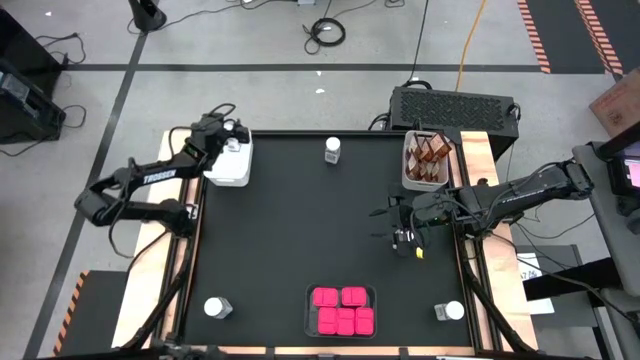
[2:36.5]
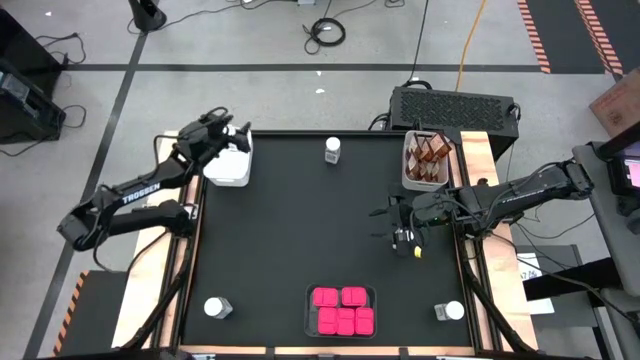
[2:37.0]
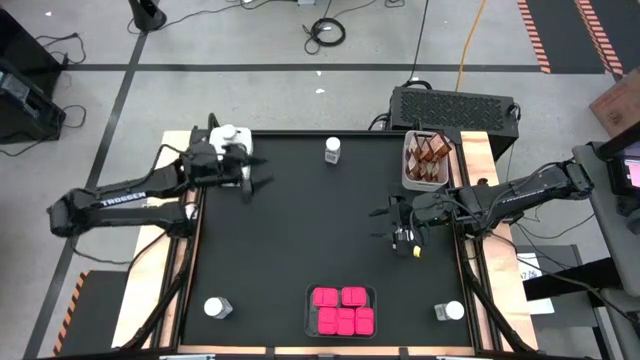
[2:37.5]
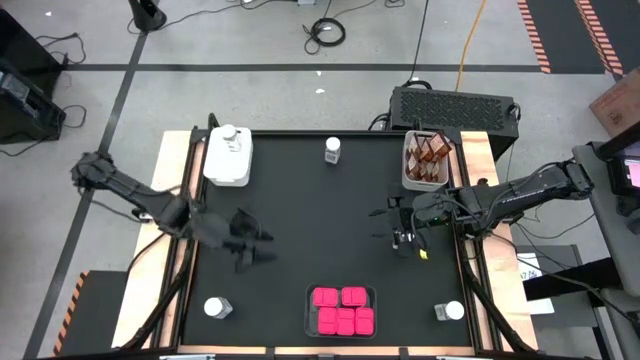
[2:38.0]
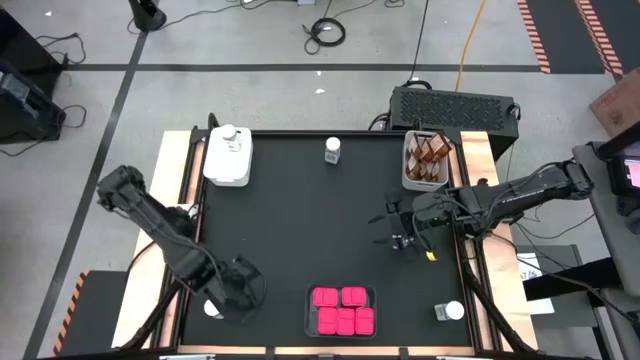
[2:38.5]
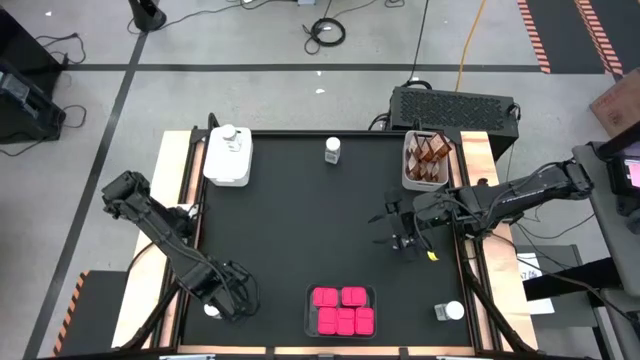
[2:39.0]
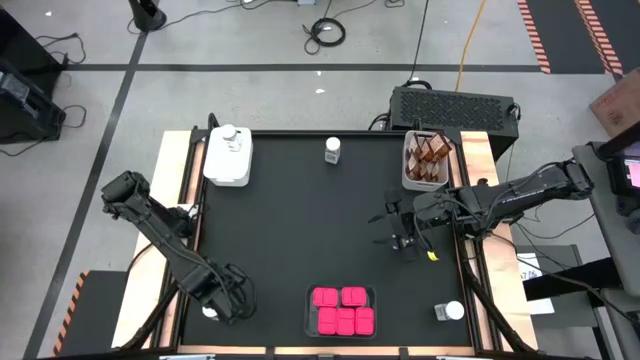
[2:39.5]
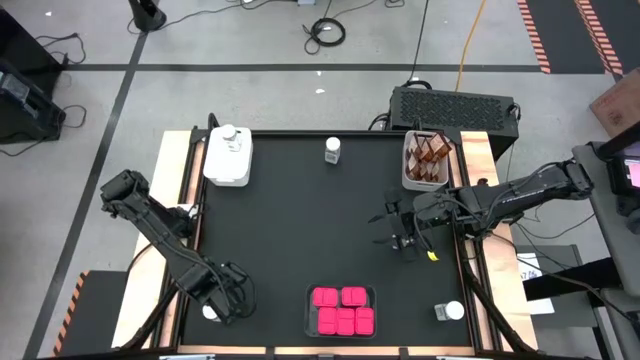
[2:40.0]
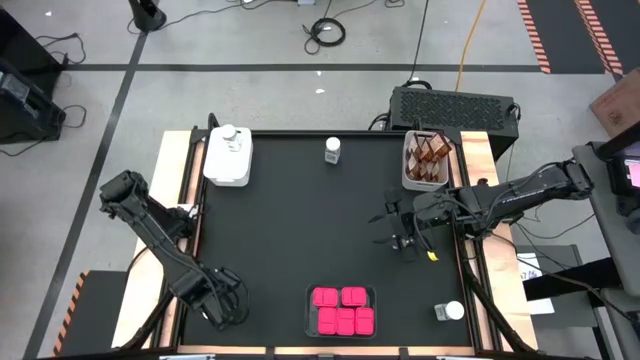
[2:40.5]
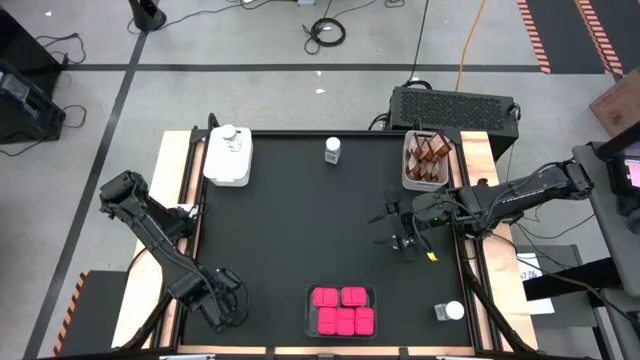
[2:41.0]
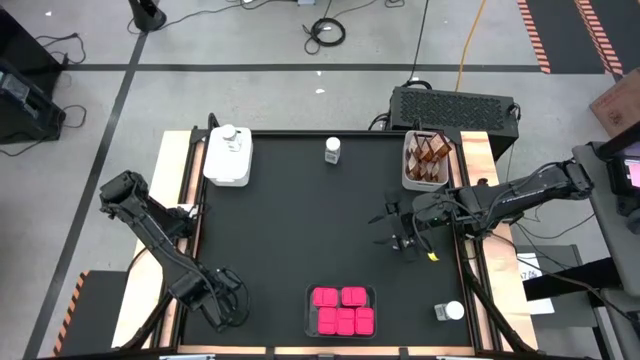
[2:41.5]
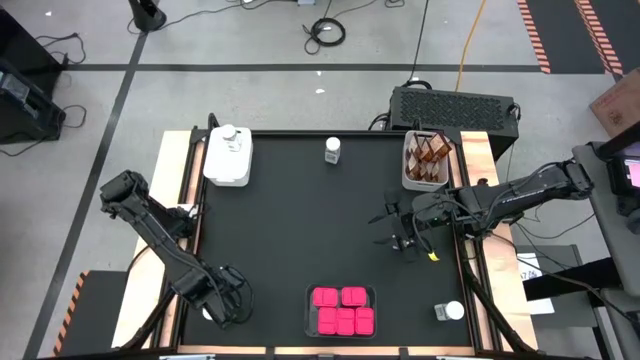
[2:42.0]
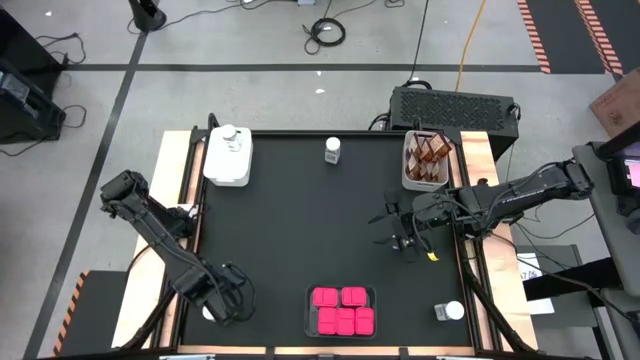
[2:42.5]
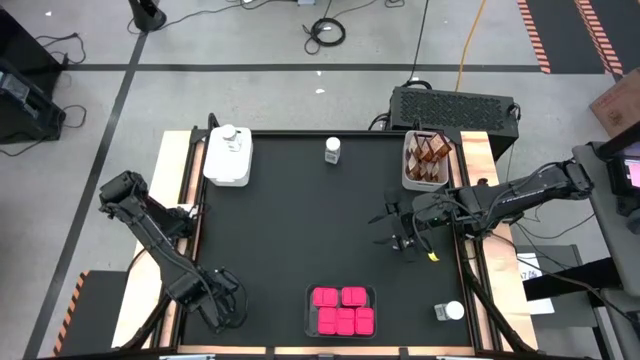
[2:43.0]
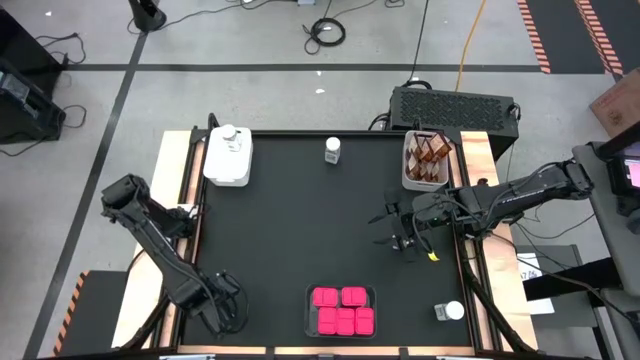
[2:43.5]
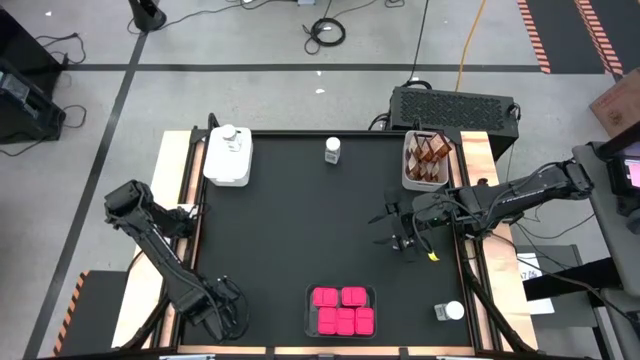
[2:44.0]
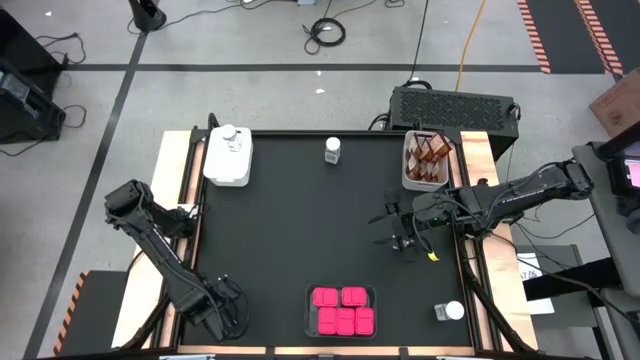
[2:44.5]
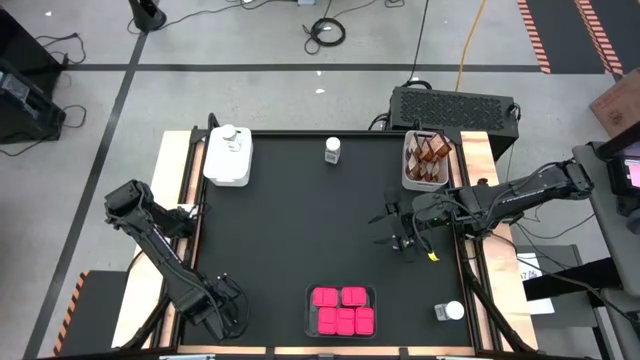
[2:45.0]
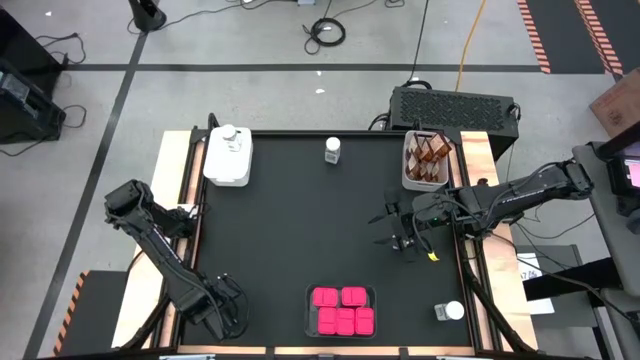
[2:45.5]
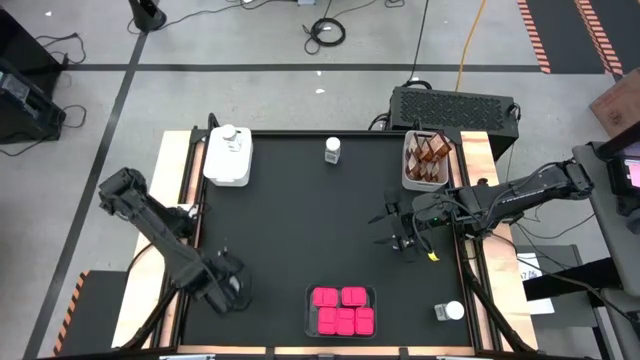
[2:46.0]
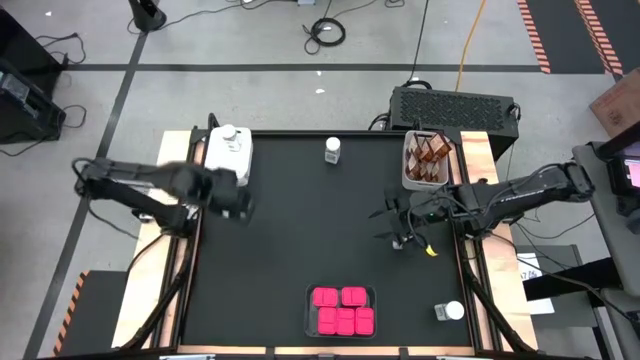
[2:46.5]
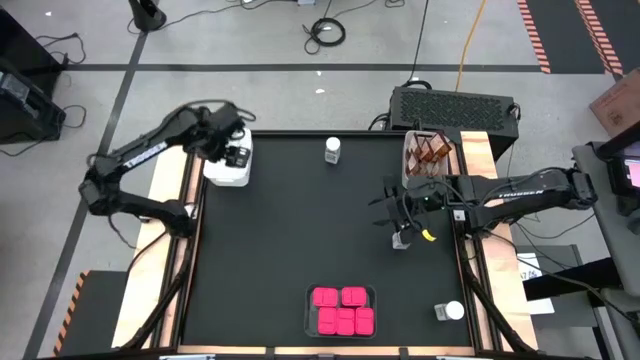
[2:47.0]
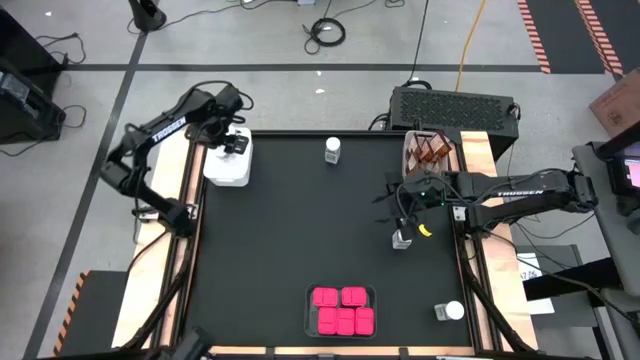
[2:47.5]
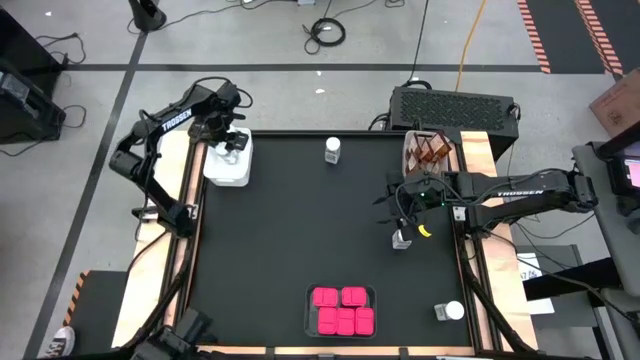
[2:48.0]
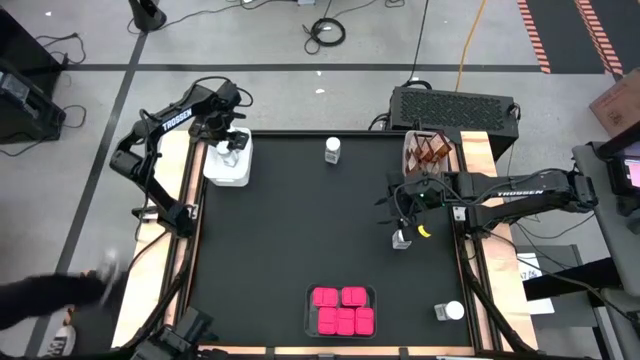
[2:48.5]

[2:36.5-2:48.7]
Task: Sort spices by type
Put the white seasoning bottle into the left white bin

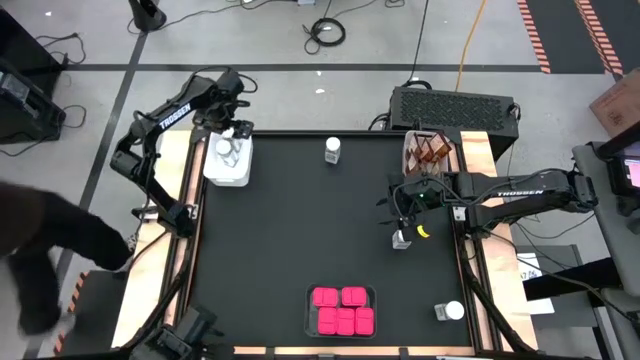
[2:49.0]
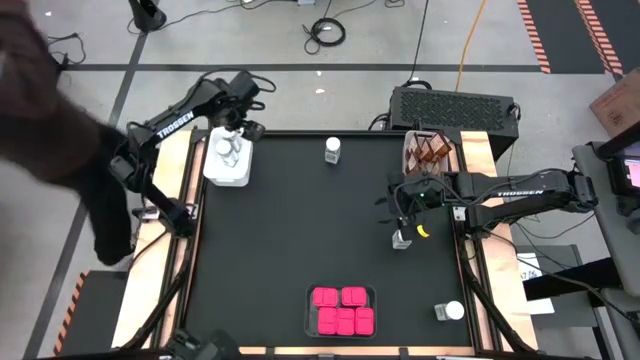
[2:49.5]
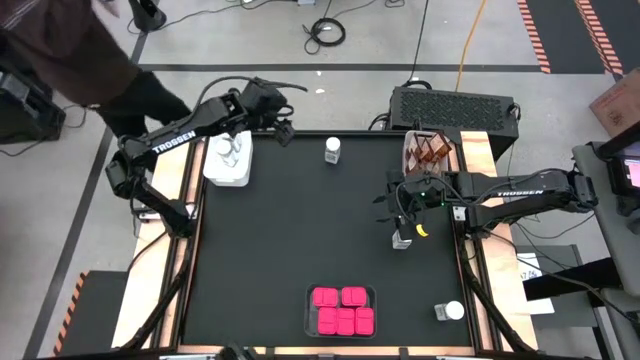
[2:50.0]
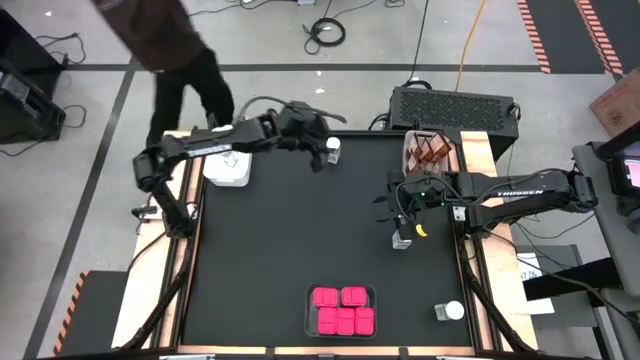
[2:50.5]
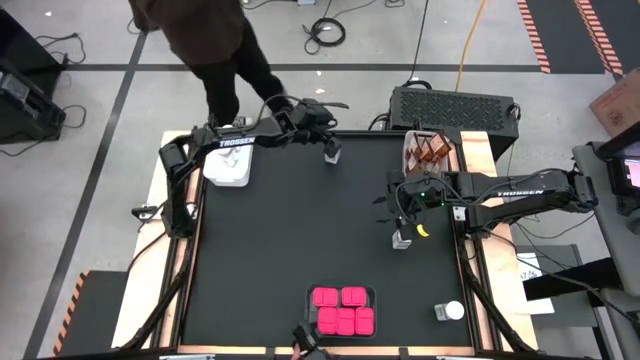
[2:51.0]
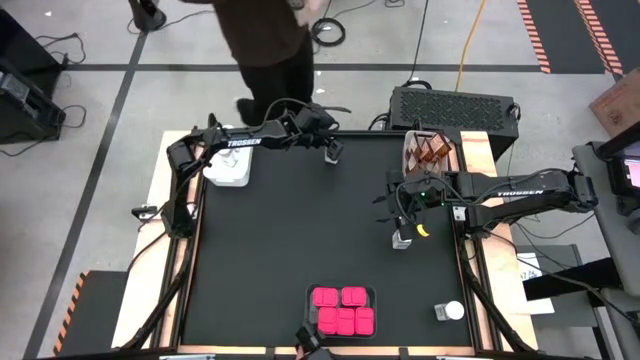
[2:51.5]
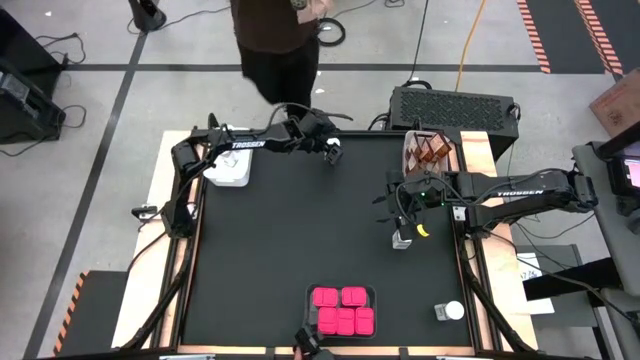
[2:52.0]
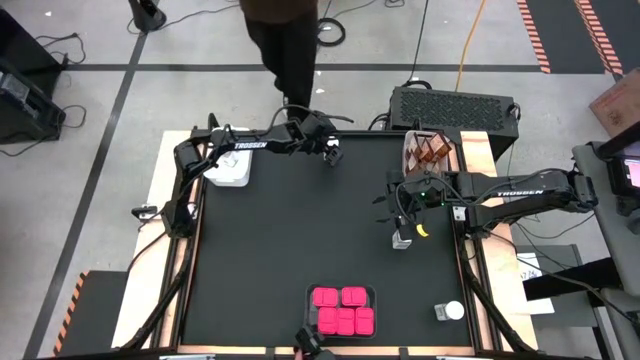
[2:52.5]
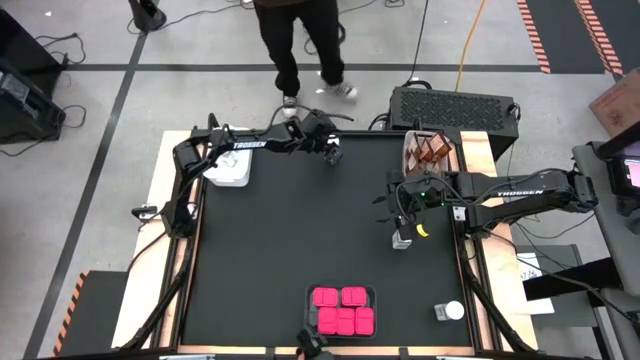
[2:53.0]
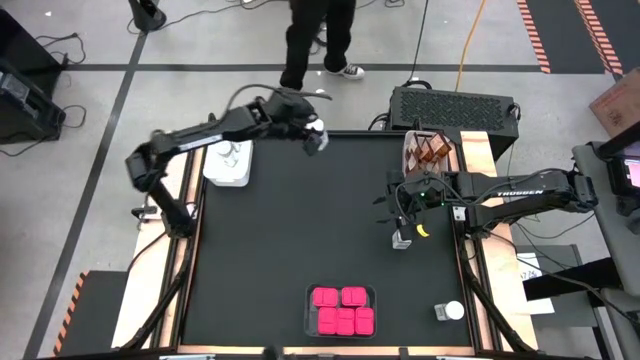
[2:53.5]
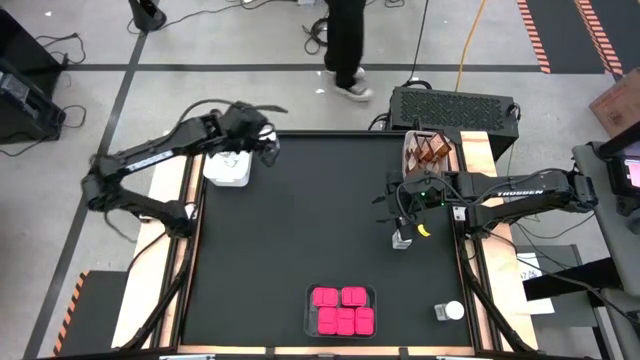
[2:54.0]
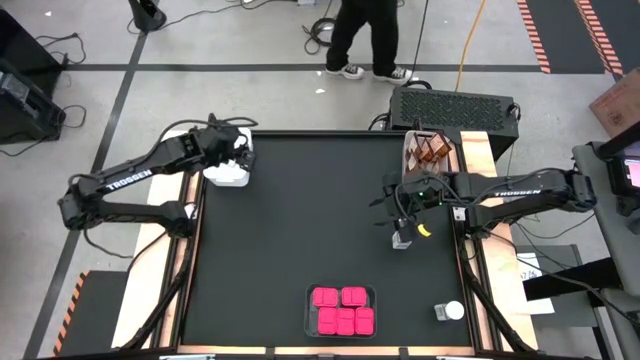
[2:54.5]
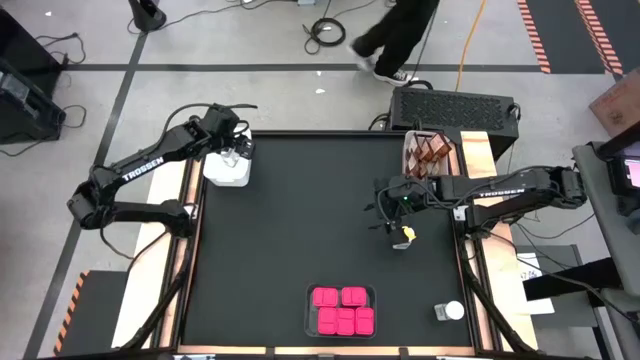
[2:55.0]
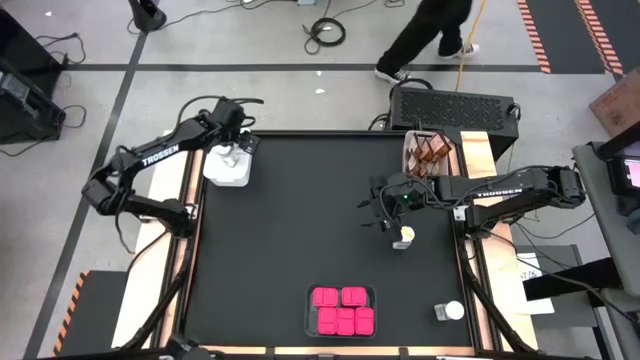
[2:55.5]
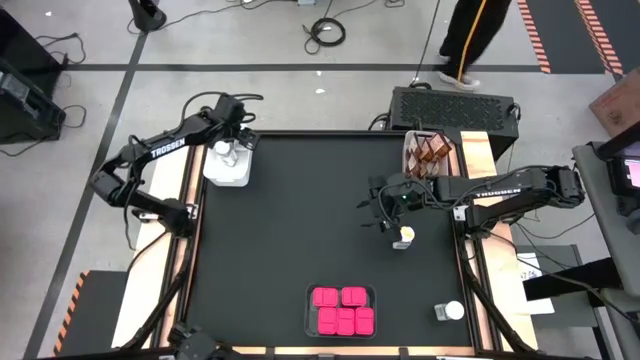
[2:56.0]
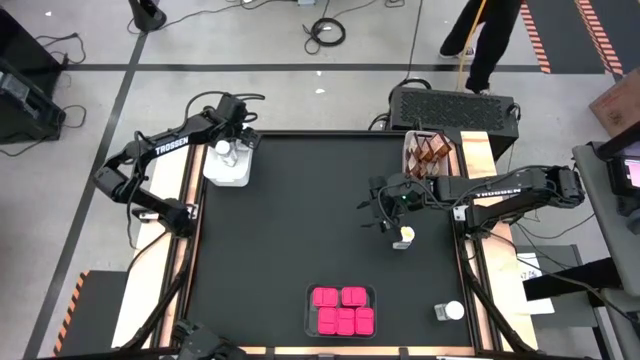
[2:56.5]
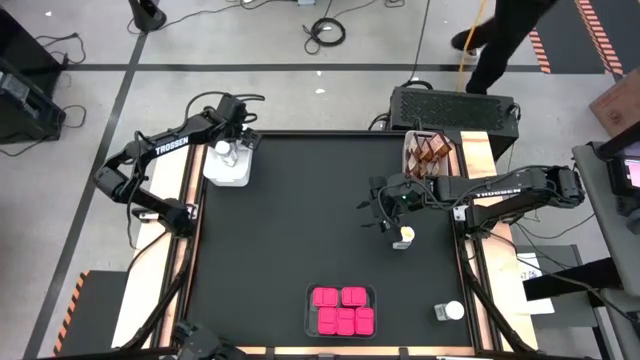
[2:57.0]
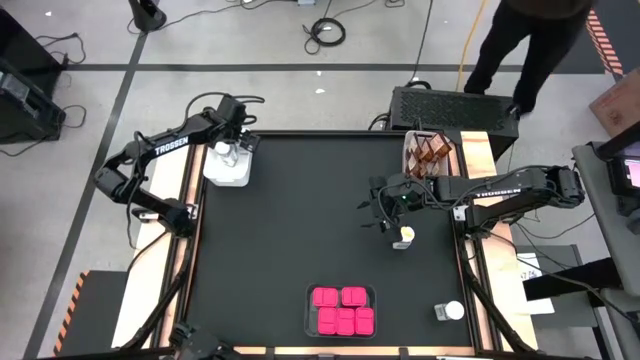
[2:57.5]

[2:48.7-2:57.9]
Put the white seasoning bottle into the left white bin

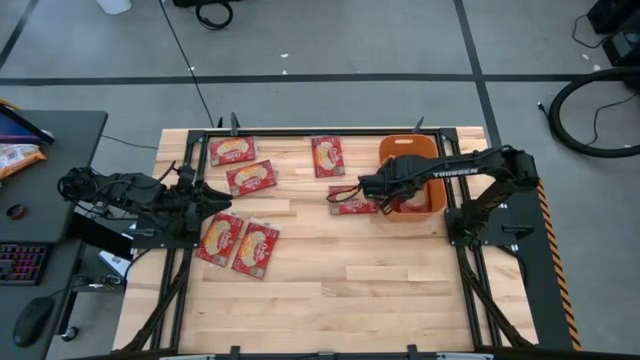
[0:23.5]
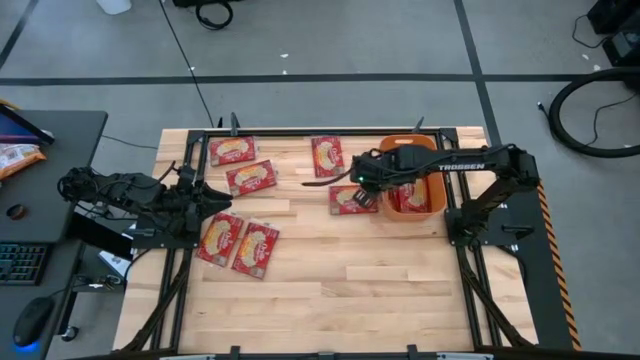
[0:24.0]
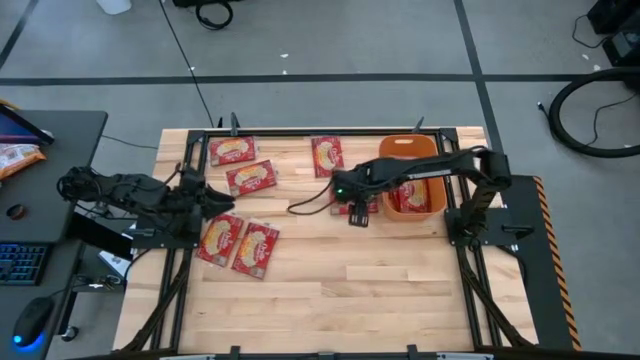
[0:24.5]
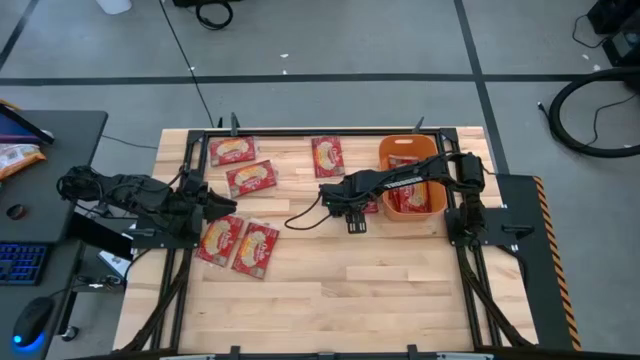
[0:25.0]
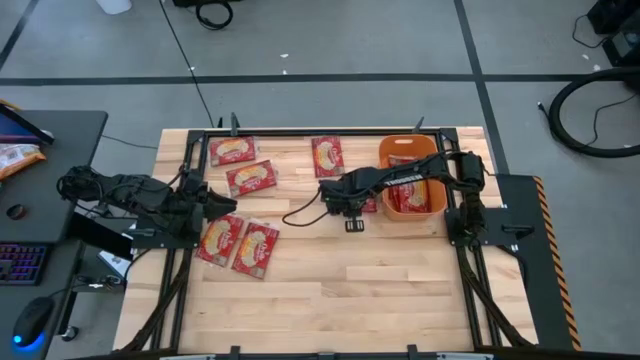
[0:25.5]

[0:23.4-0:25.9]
Task: Sort popcorn bags into baskets
Put the red popcorn bag into the orange bin
